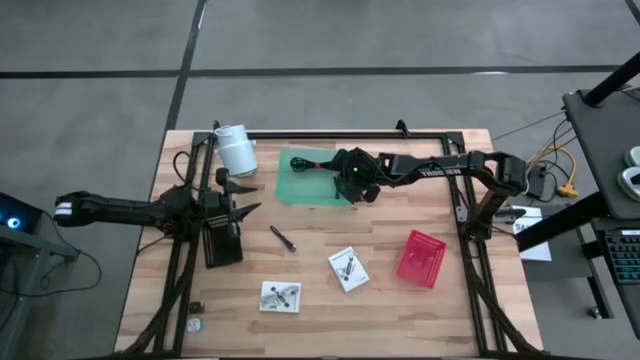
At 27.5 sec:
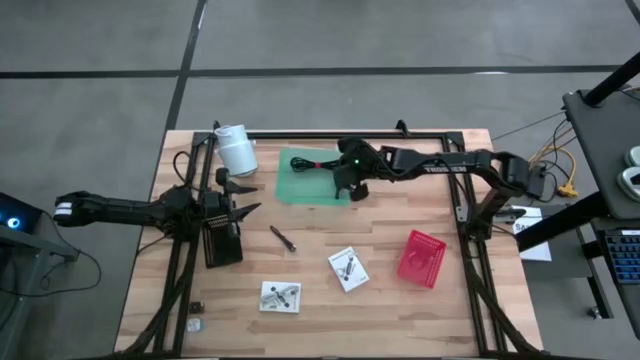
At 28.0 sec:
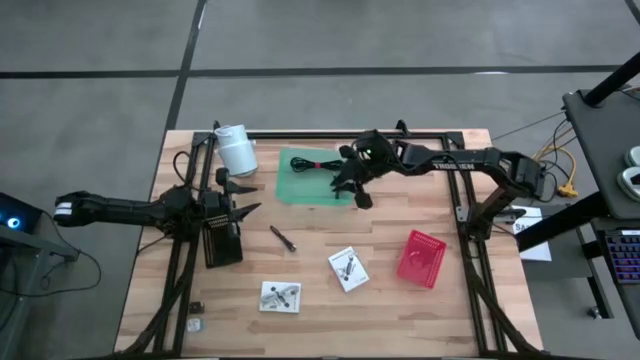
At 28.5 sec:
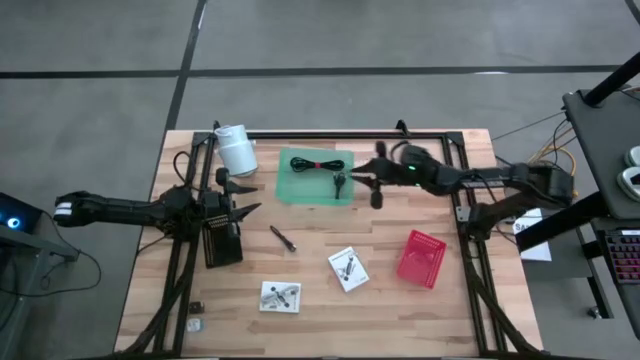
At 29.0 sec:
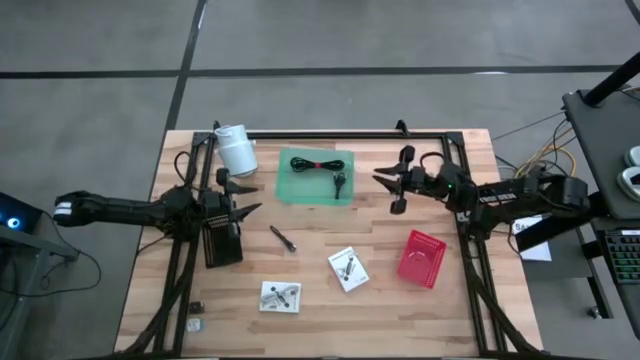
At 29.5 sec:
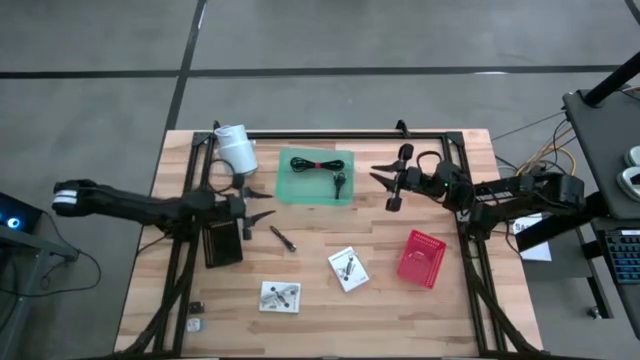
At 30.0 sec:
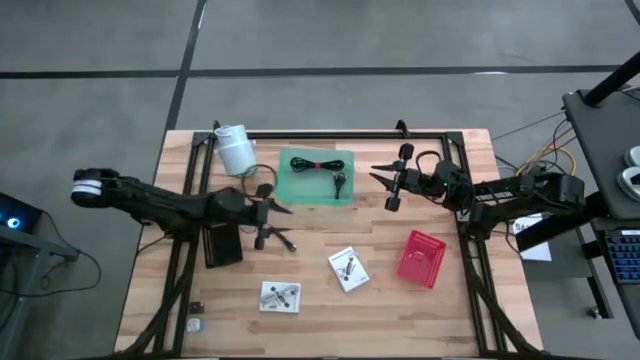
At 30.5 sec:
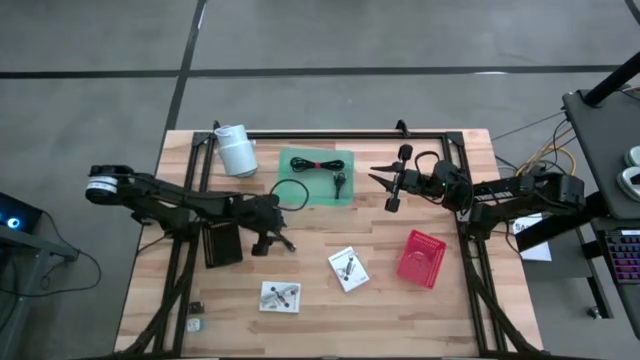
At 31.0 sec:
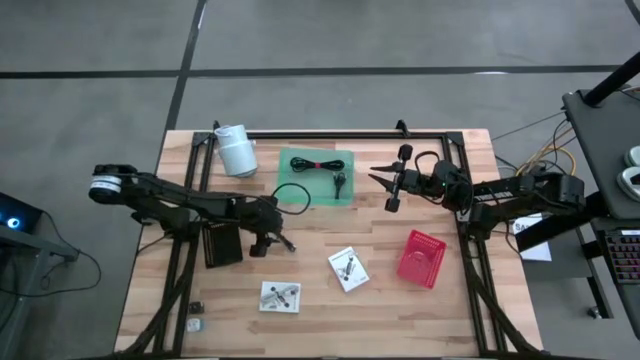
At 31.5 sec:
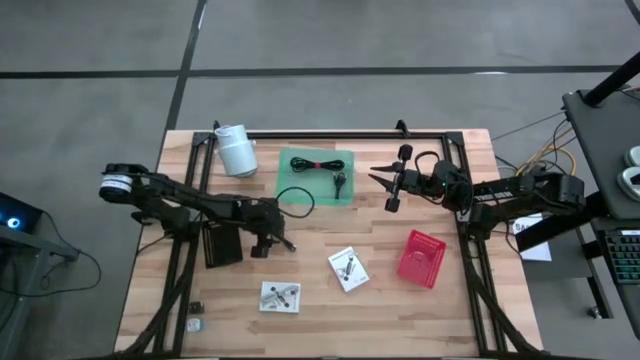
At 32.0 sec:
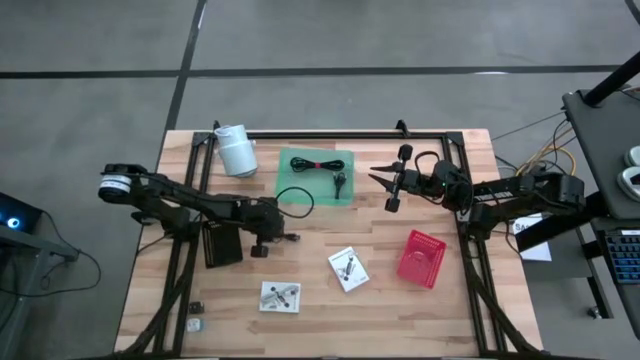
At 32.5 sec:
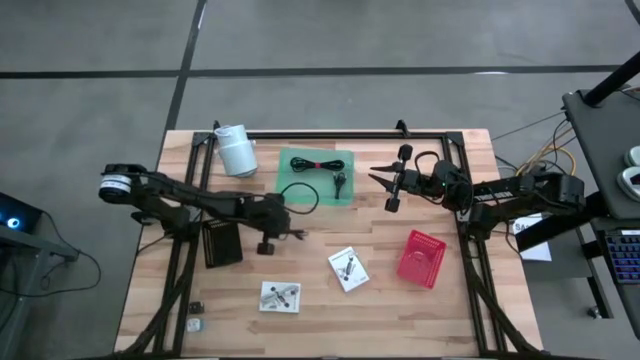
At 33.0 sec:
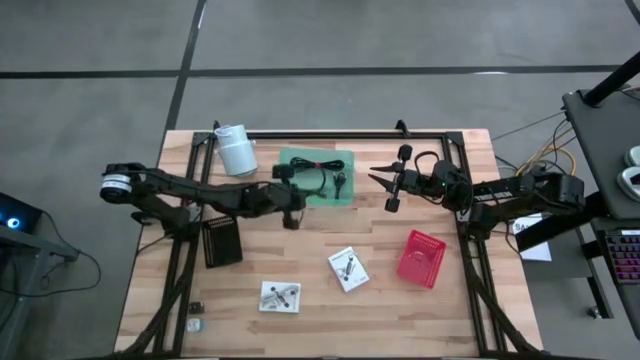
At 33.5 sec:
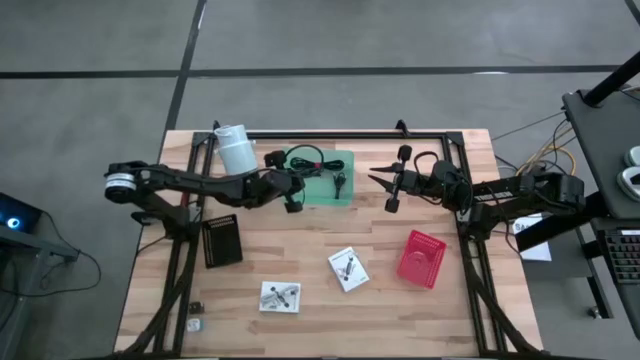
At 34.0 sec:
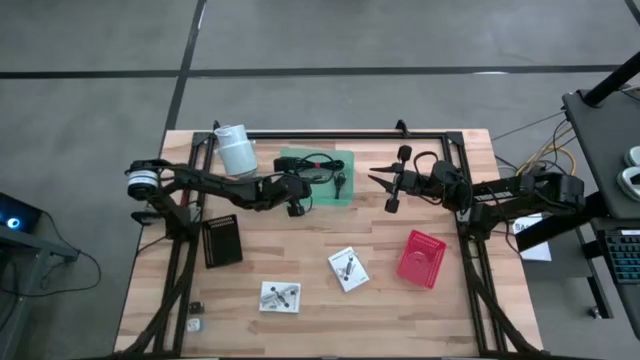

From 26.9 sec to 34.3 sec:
Task: Pick and place items into bin
Put the black charger cable into the green bin

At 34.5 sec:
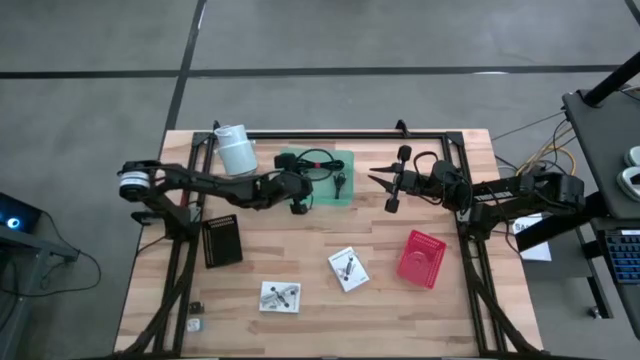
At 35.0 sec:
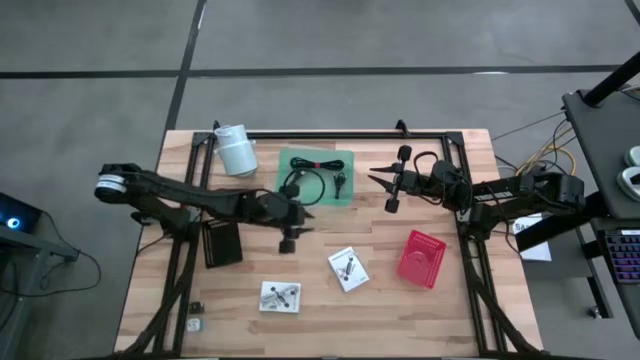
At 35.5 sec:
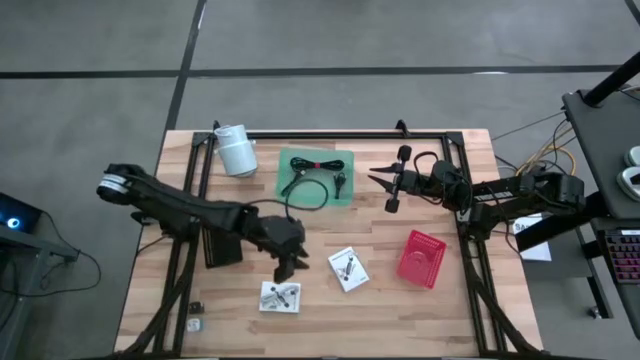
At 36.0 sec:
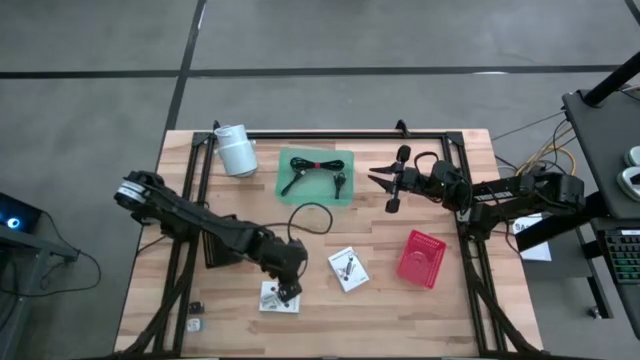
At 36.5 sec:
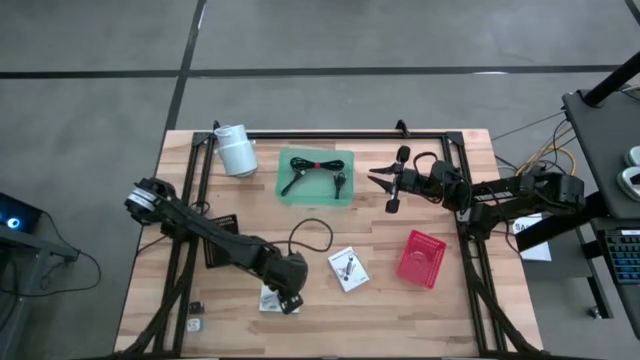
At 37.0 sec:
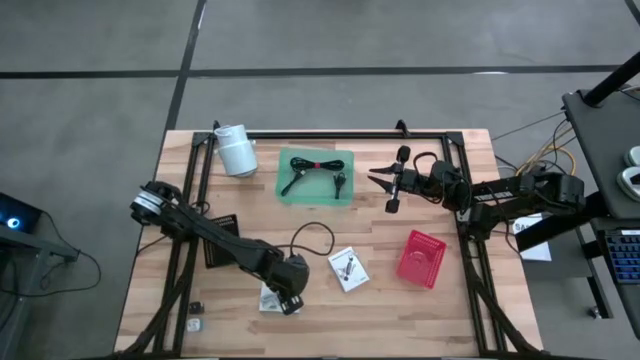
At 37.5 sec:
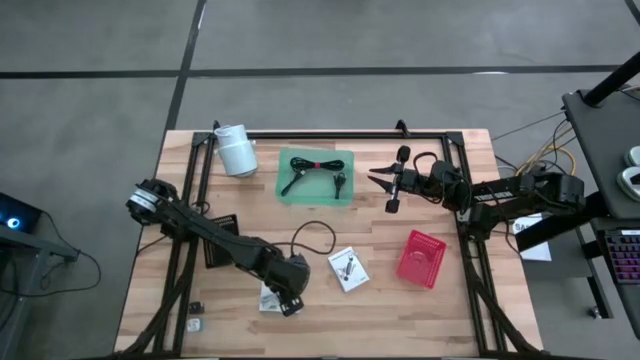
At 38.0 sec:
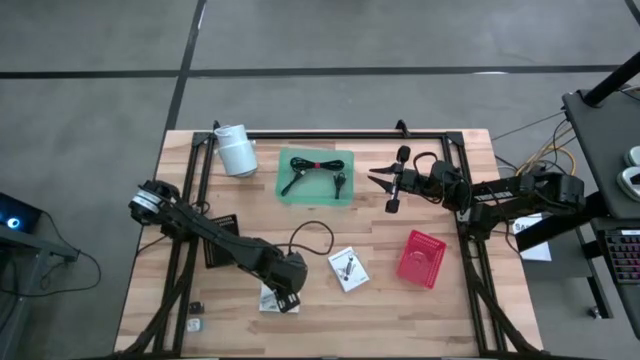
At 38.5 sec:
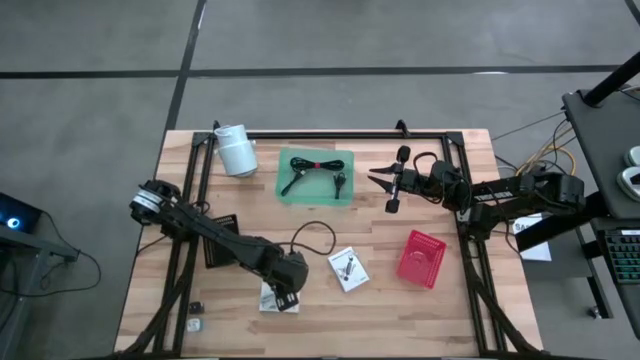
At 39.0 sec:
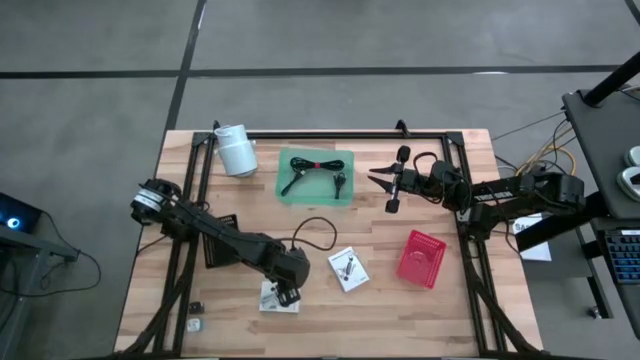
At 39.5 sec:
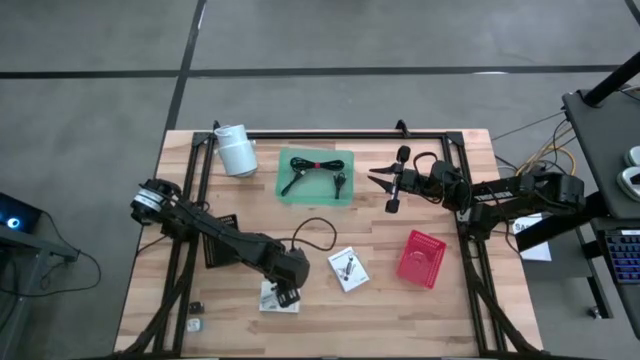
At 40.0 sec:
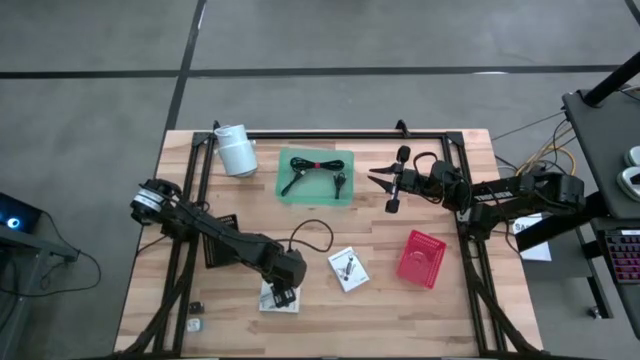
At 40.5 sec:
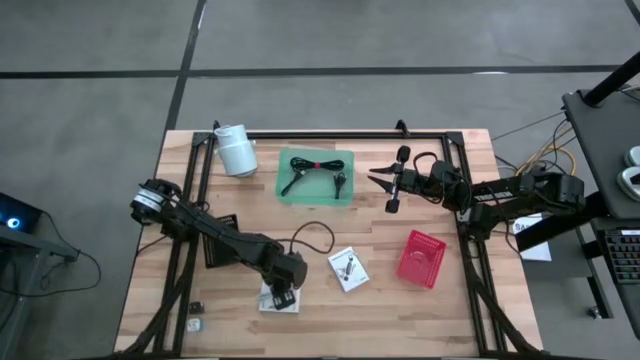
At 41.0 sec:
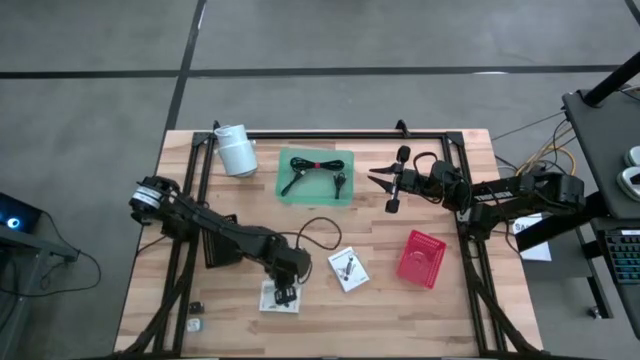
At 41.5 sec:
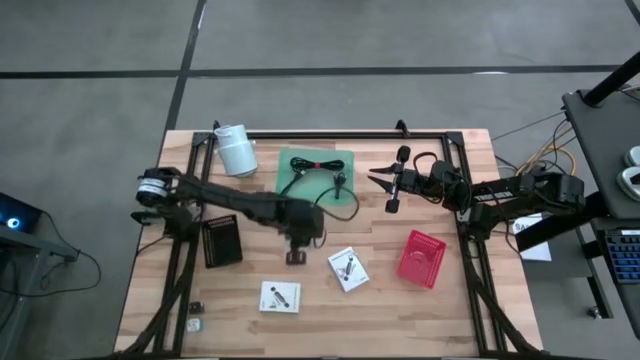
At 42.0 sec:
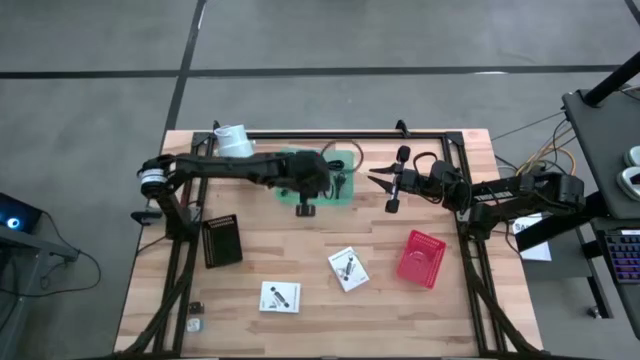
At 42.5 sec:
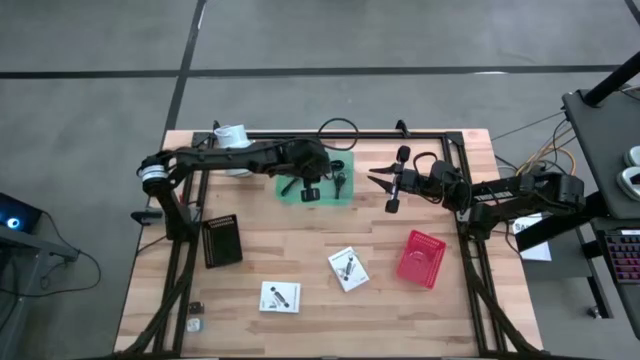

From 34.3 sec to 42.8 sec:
Put the white charger cable into the green bin

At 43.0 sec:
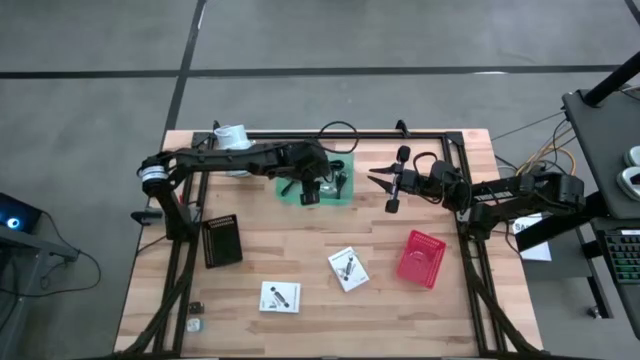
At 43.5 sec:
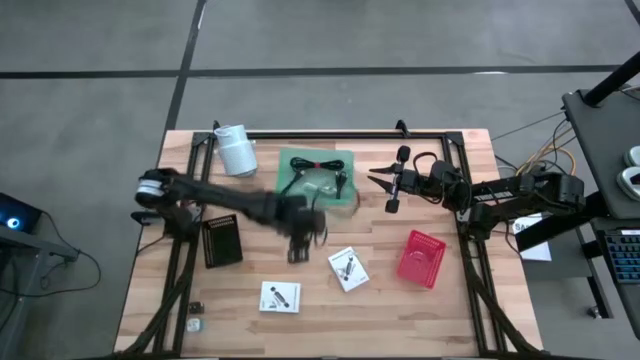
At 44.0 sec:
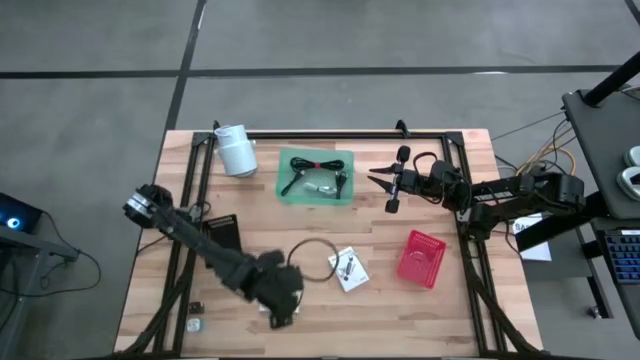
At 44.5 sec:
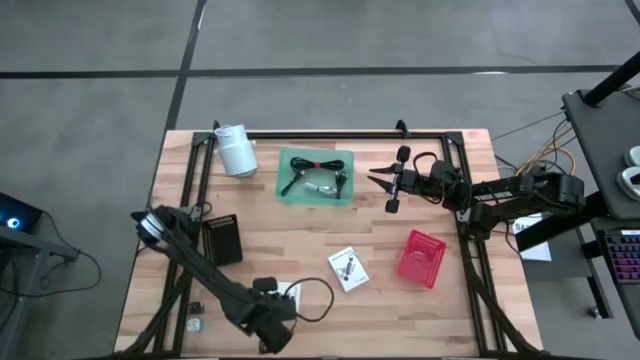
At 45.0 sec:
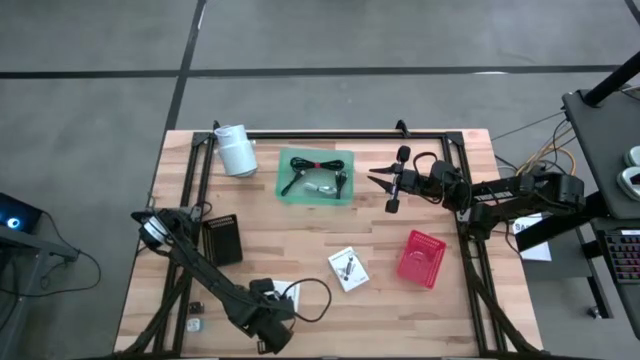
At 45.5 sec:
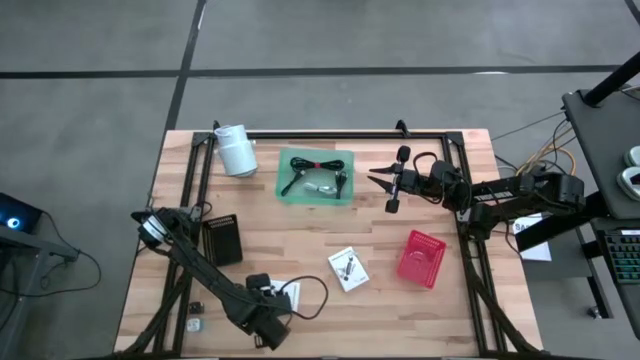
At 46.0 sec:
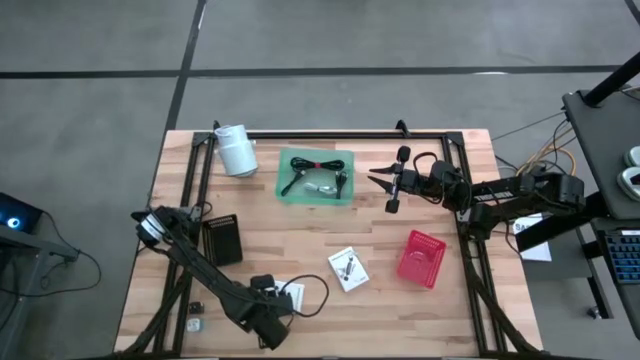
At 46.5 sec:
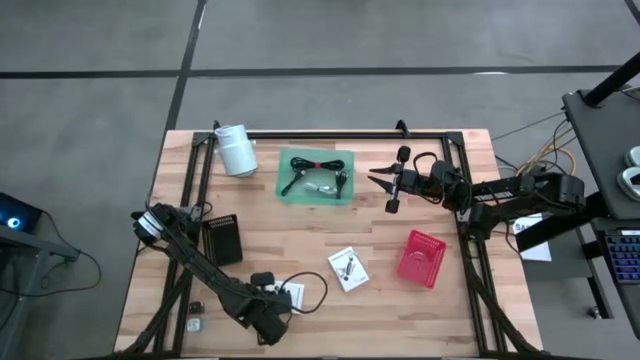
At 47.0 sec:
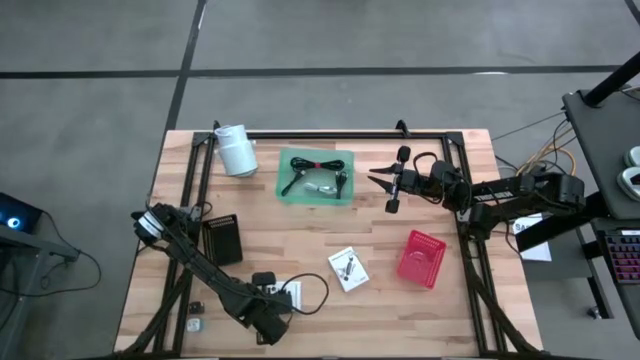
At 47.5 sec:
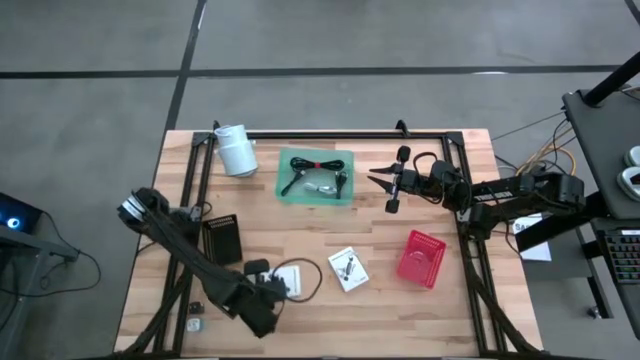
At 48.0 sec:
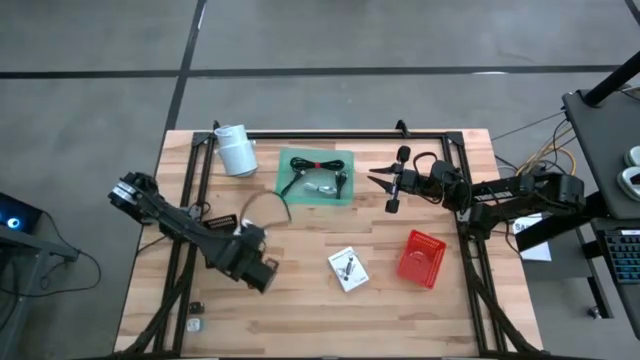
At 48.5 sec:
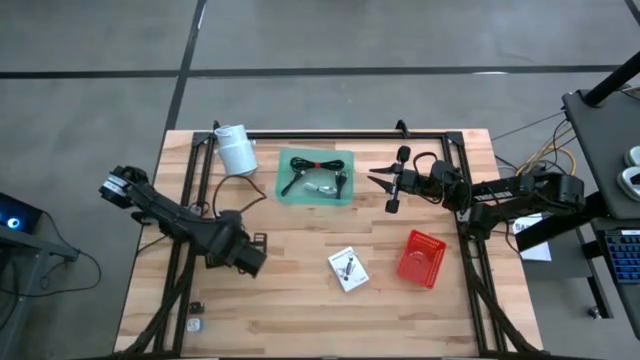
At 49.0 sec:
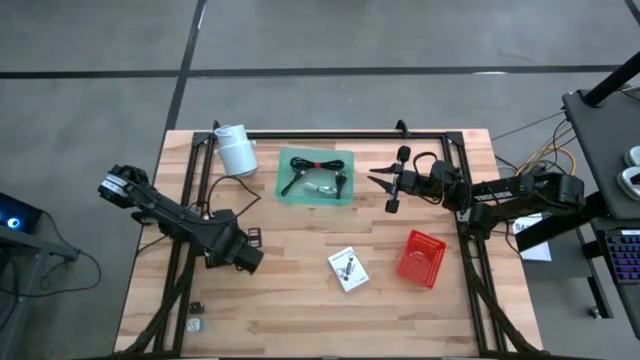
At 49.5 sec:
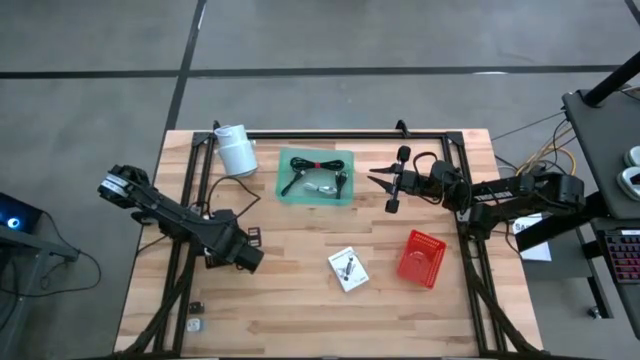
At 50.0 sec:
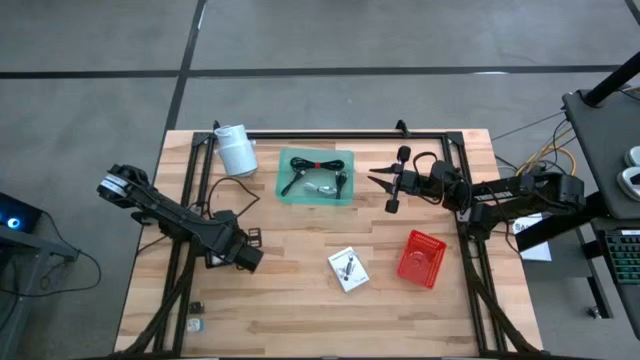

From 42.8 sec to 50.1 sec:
Put the left white card reader box into the black bin
